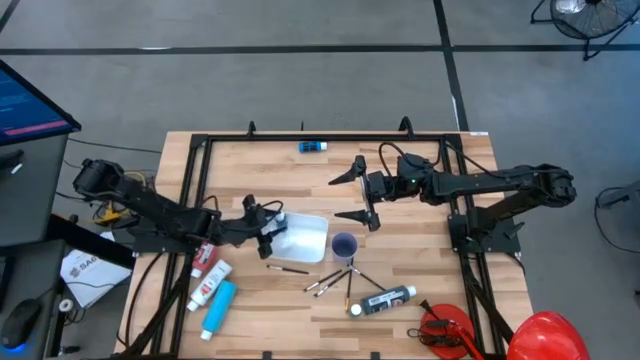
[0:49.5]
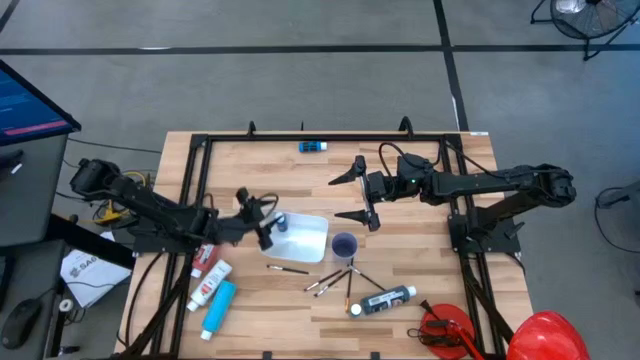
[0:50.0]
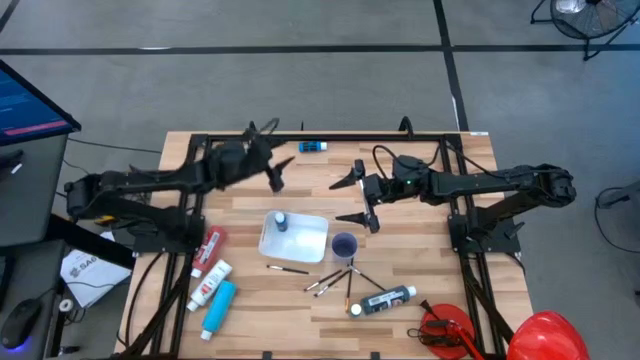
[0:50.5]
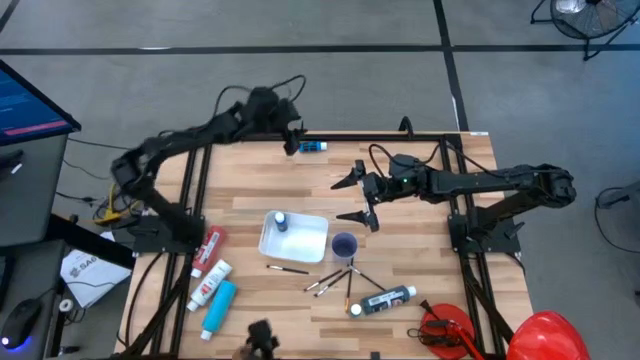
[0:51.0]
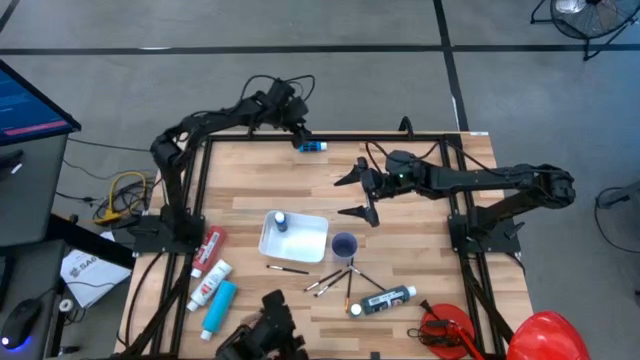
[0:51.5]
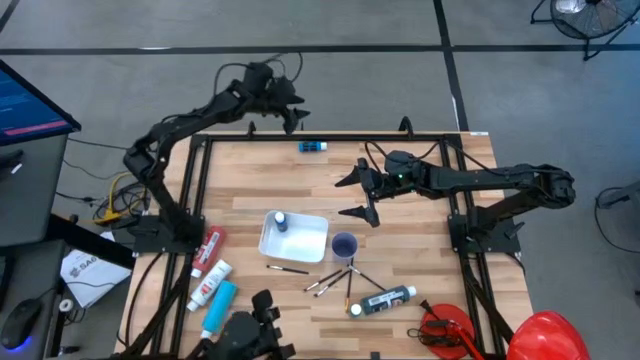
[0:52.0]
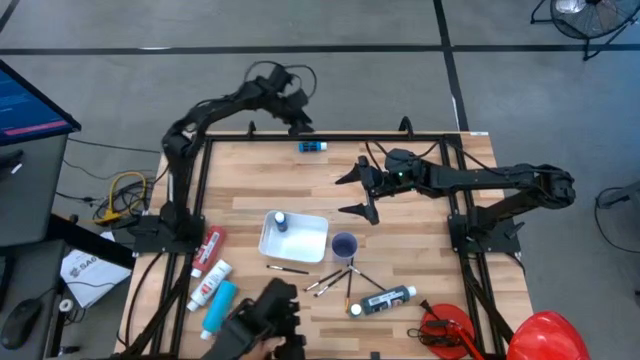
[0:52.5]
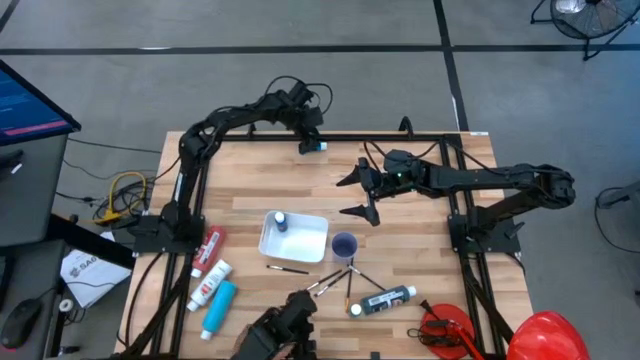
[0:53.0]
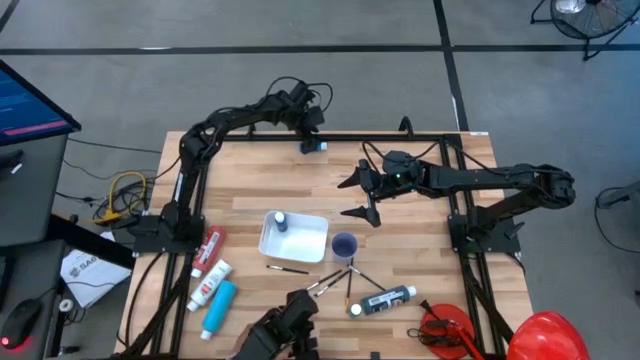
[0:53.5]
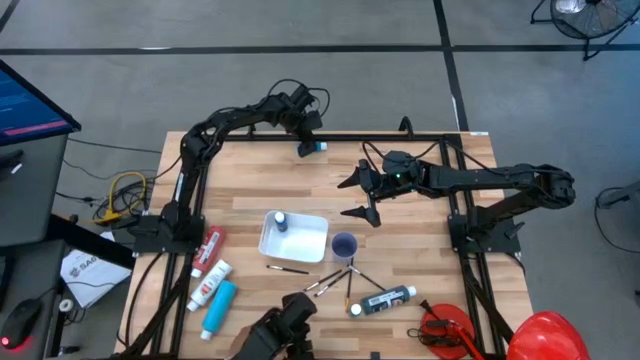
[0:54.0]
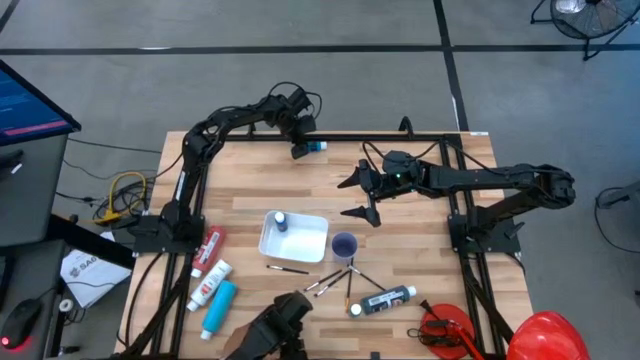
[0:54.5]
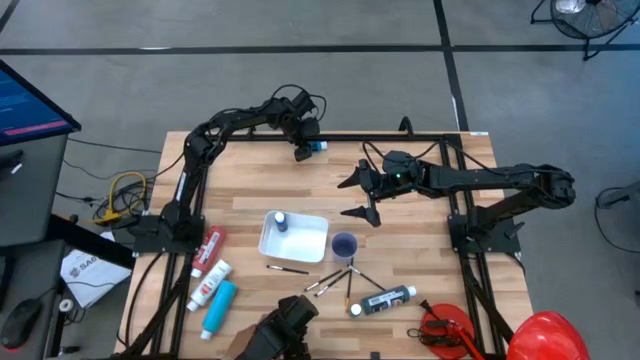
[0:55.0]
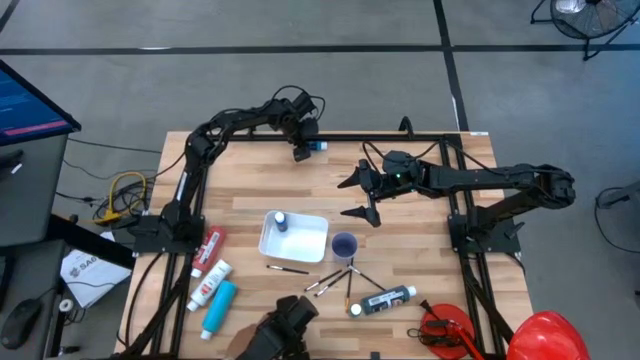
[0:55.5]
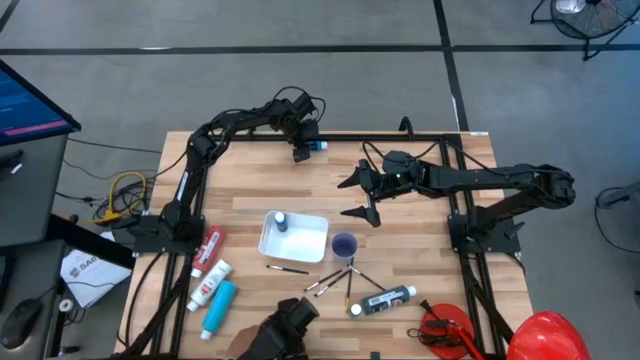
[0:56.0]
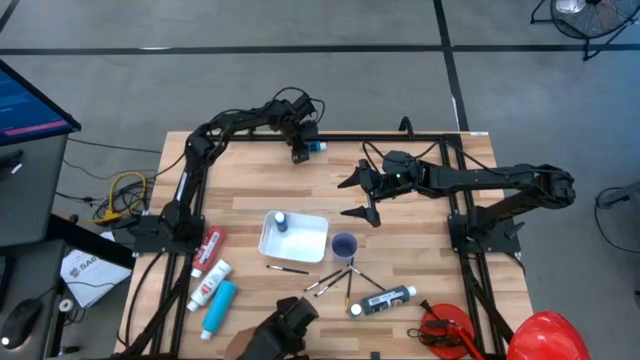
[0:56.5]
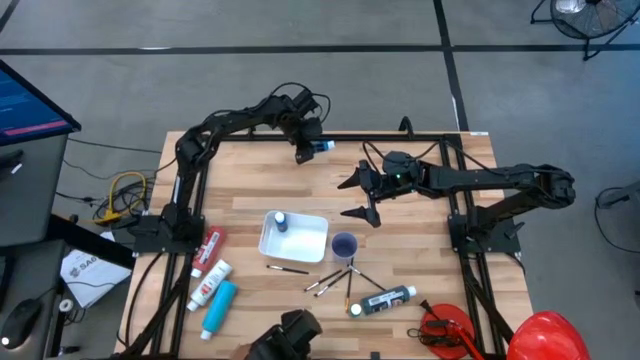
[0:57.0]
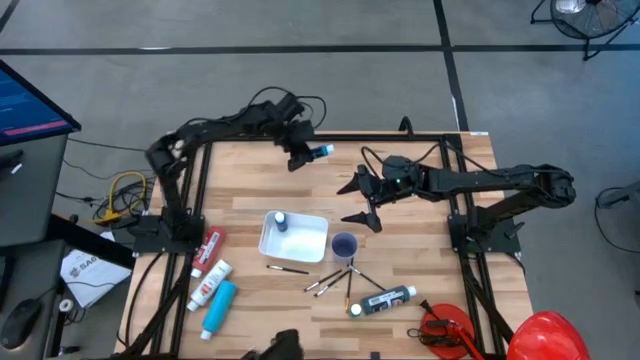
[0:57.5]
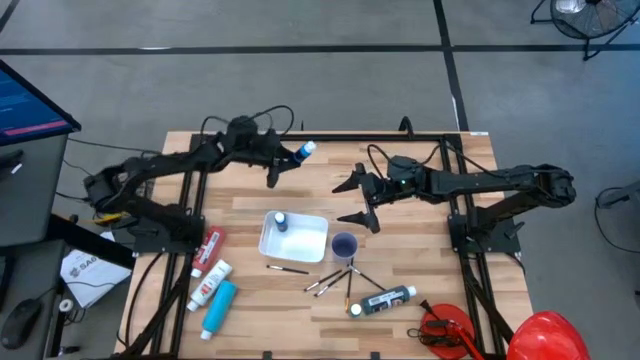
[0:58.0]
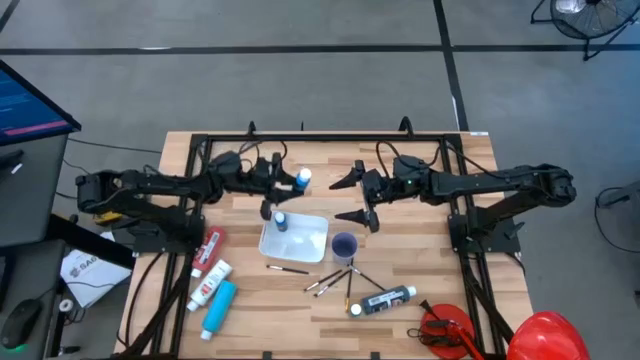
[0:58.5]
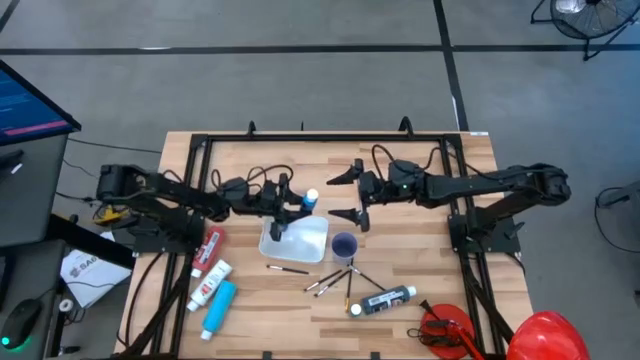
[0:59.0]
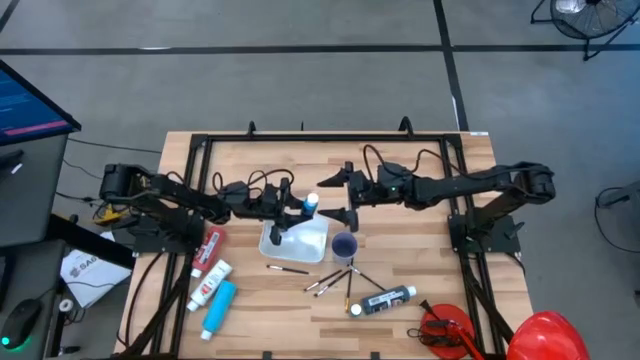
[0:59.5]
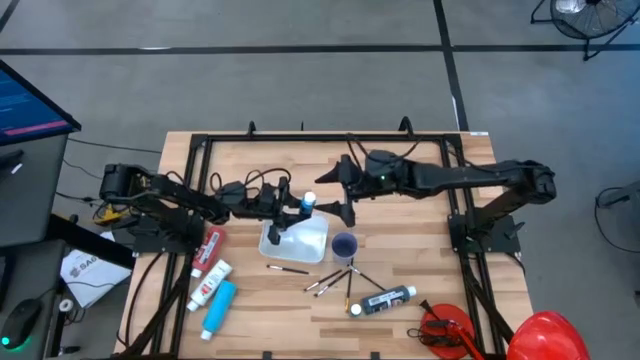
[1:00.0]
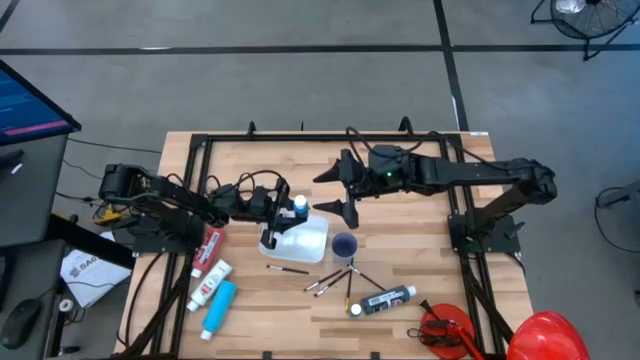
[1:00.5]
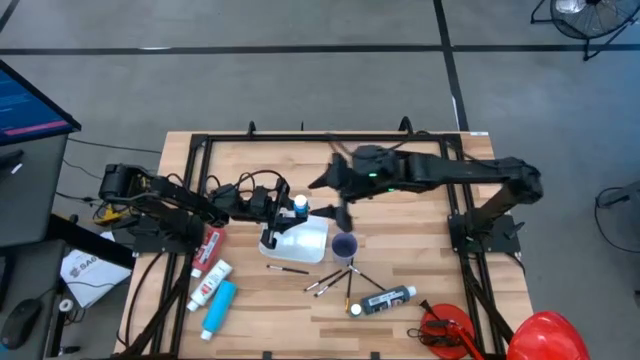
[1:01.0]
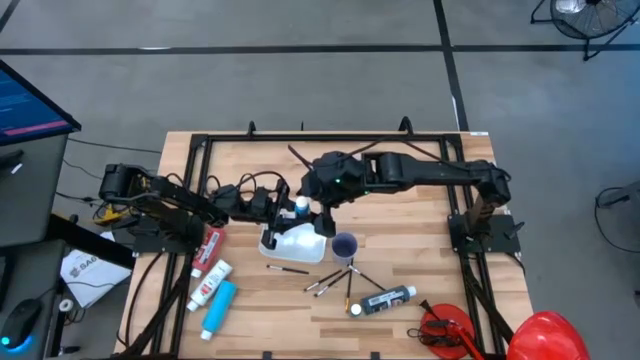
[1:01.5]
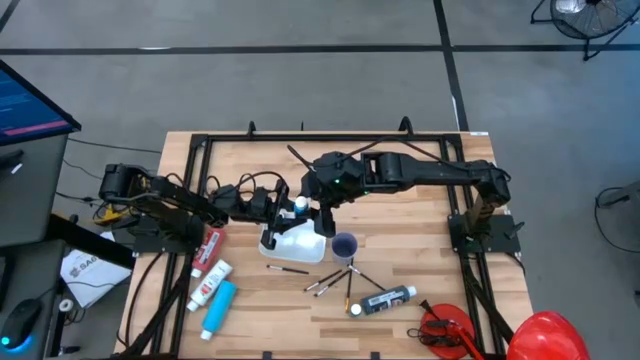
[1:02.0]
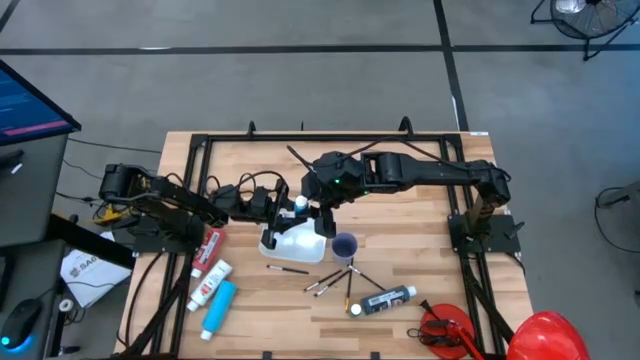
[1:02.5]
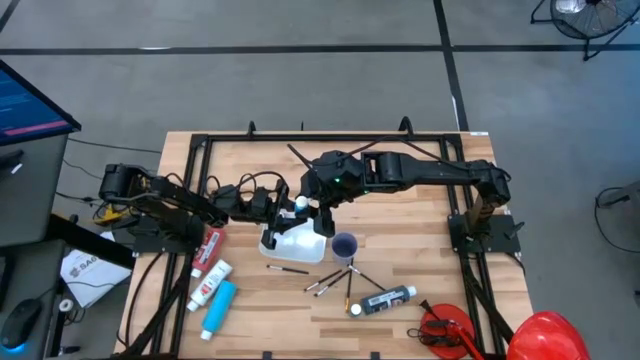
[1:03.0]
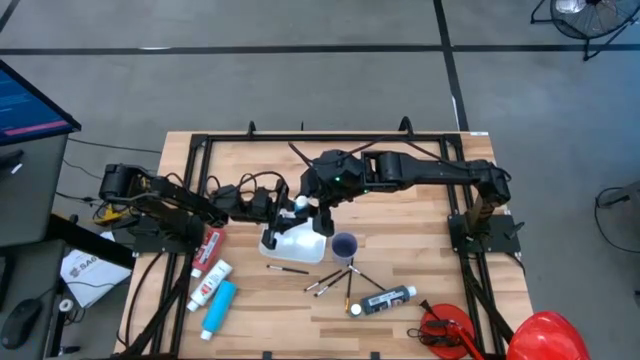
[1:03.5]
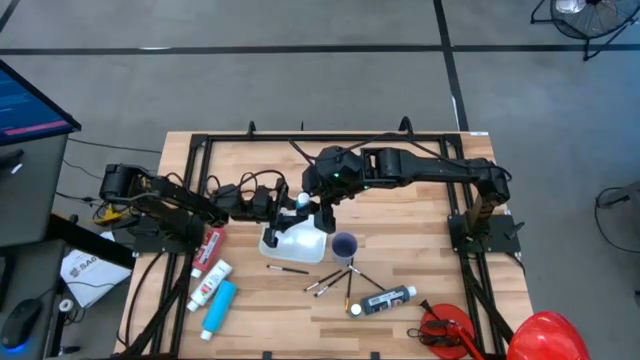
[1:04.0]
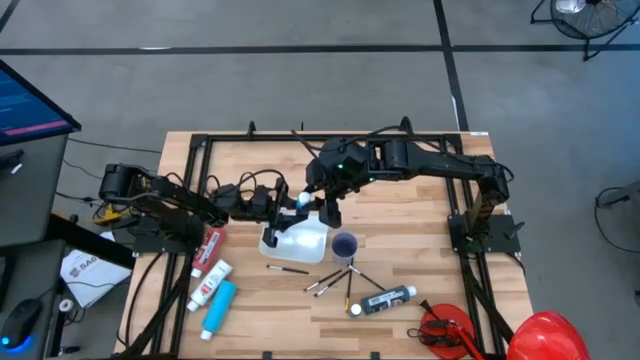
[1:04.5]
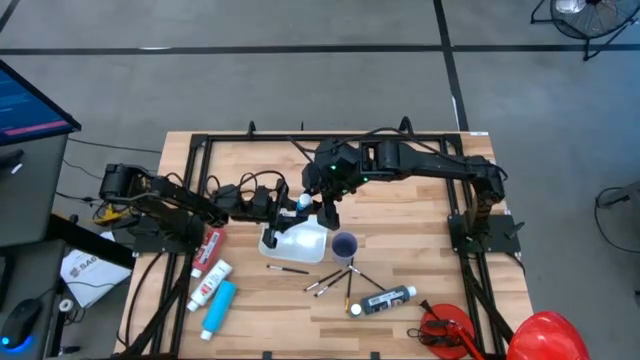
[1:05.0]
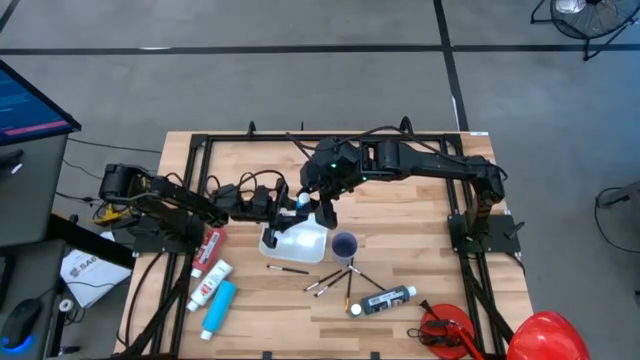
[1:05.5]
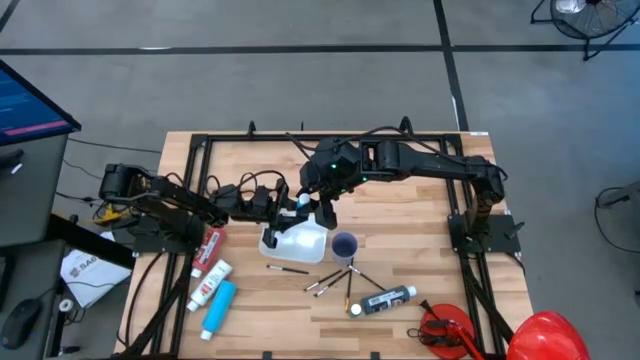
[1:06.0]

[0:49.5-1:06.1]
Task: Pick & Place Paint Supplies
Put the blue paint bottle into the white bin

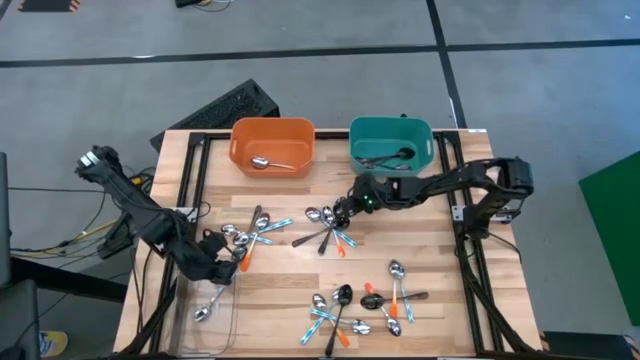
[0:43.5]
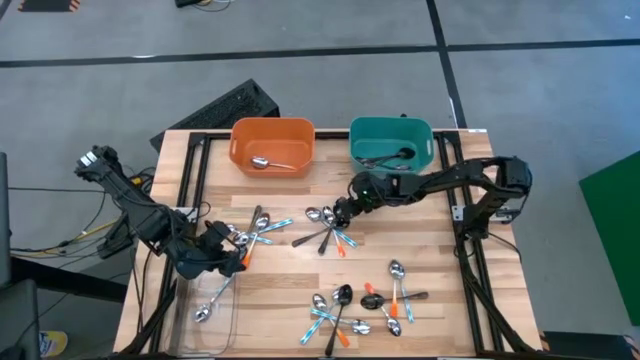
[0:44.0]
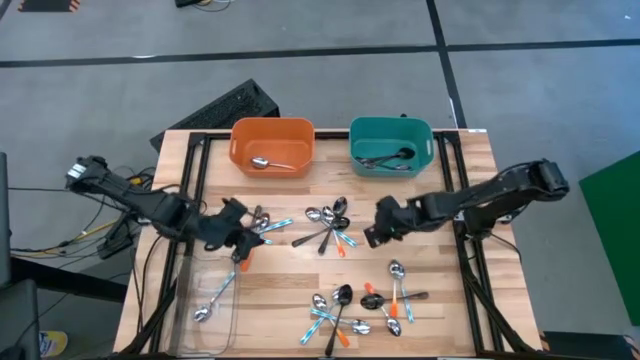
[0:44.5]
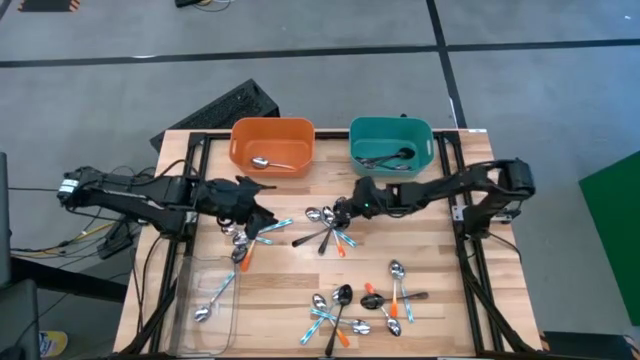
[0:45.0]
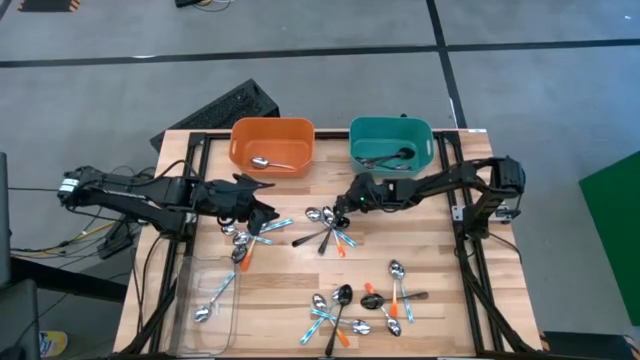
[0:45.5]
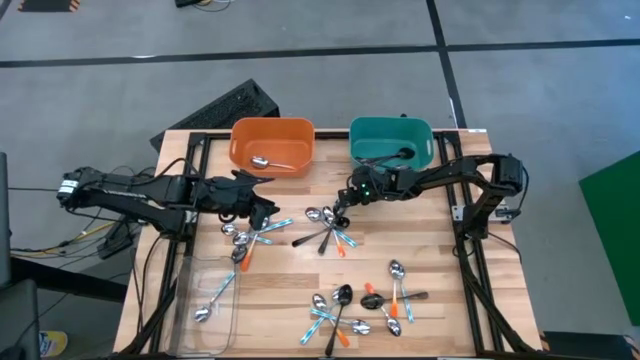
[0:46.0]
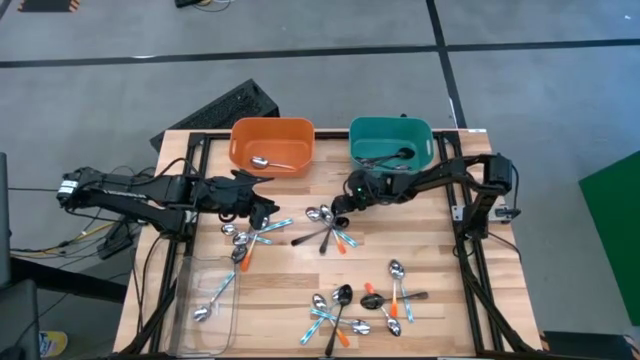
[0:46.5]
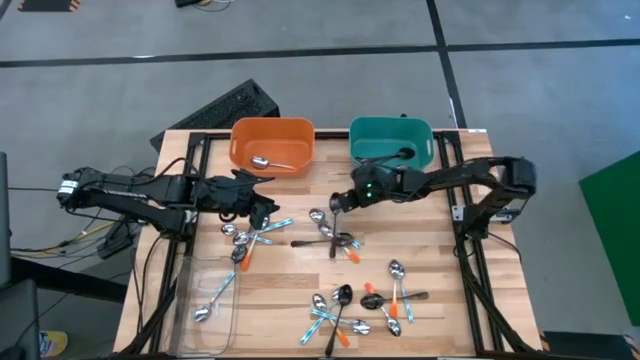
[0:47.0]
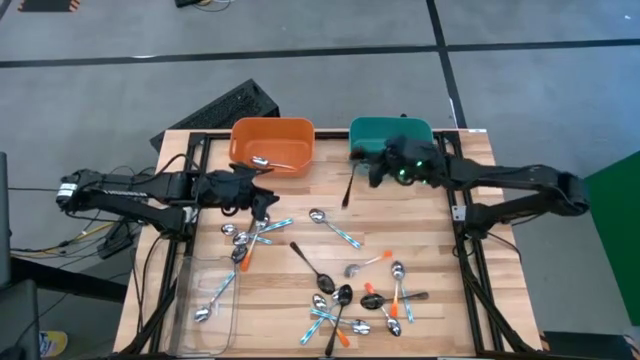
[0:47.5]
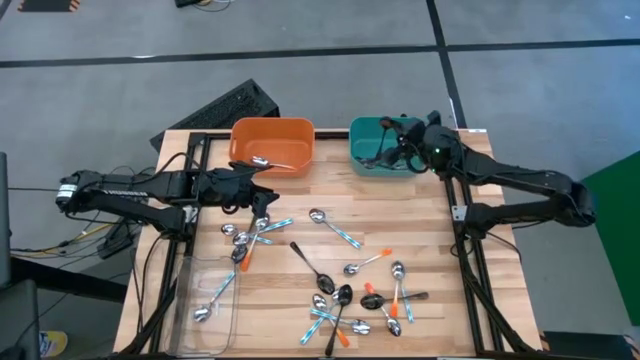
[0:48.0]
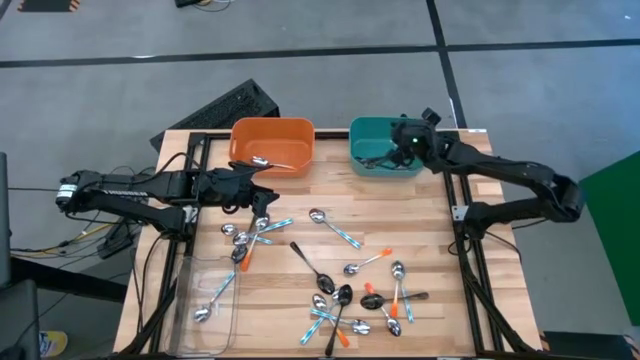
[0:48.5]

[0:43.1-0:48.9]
Task: Sort silverware by color (type)
Put the black spoon into the blue bin
